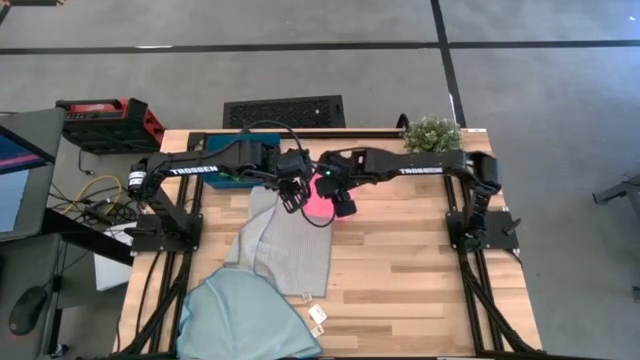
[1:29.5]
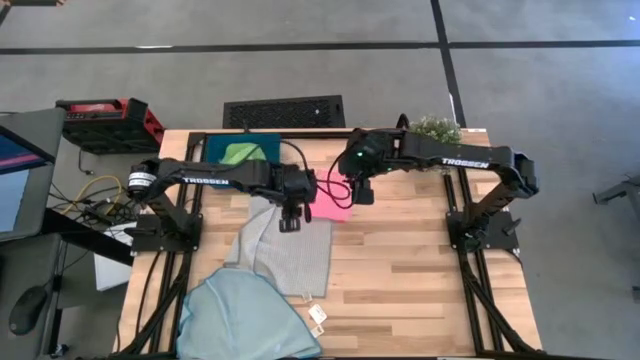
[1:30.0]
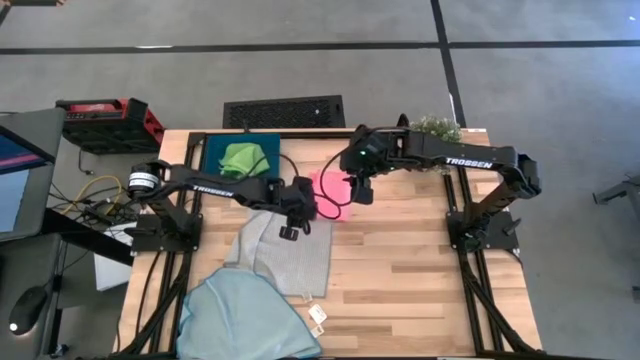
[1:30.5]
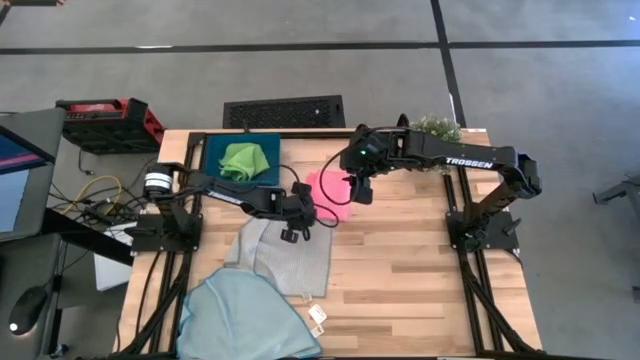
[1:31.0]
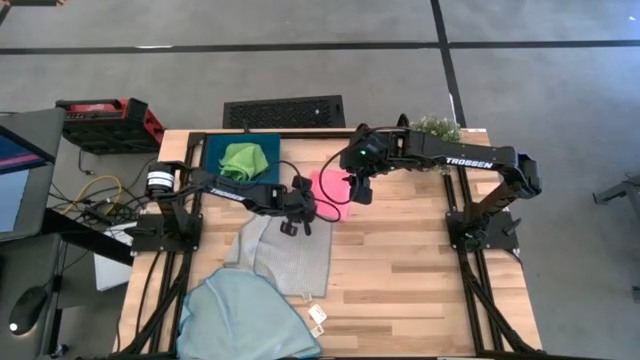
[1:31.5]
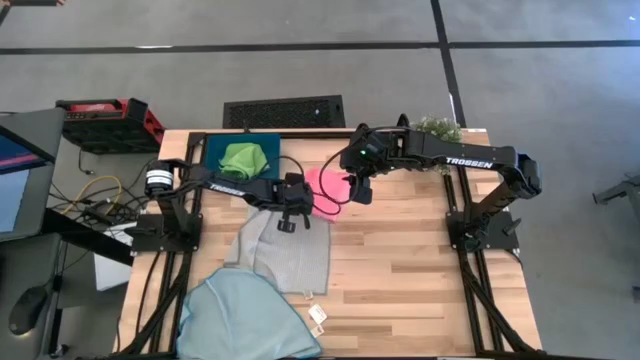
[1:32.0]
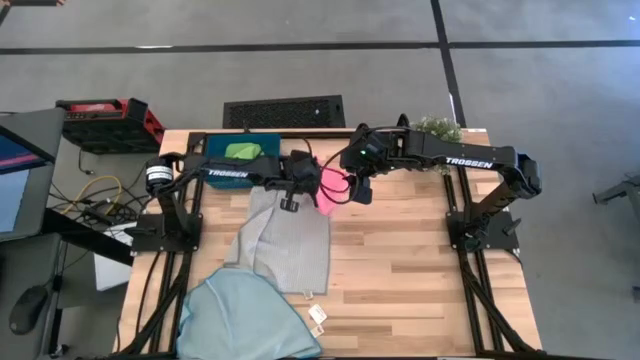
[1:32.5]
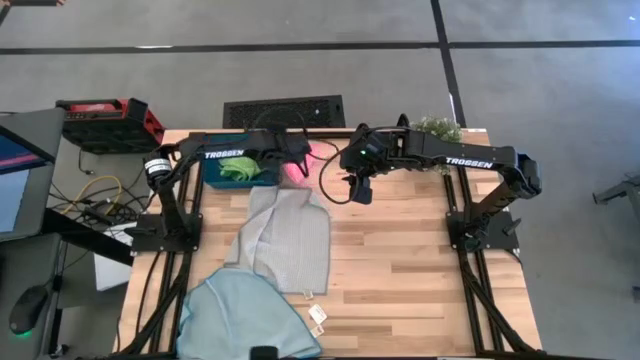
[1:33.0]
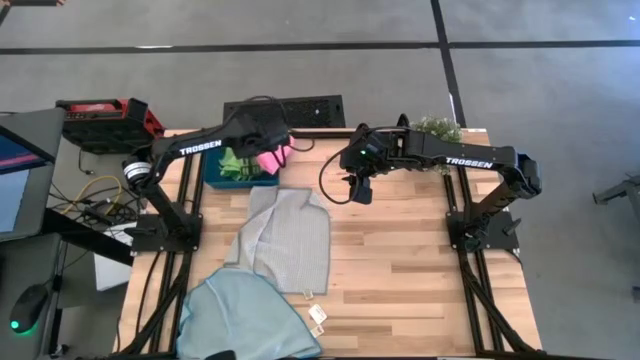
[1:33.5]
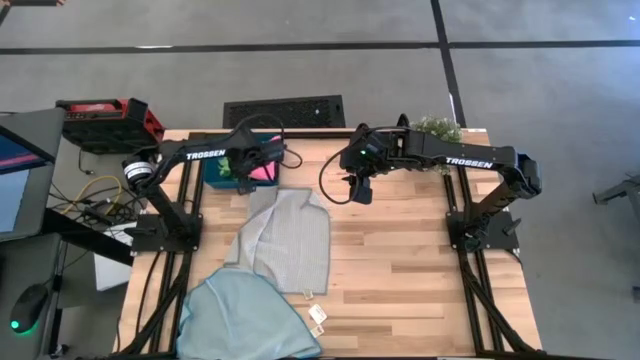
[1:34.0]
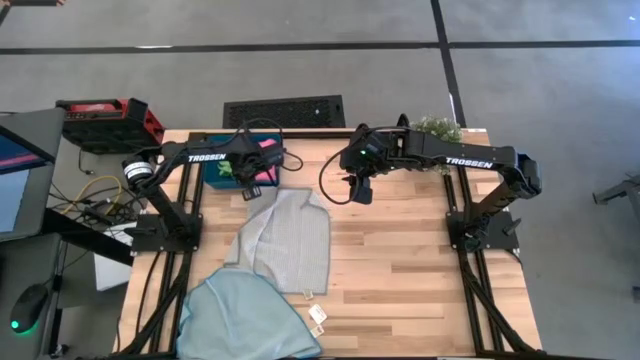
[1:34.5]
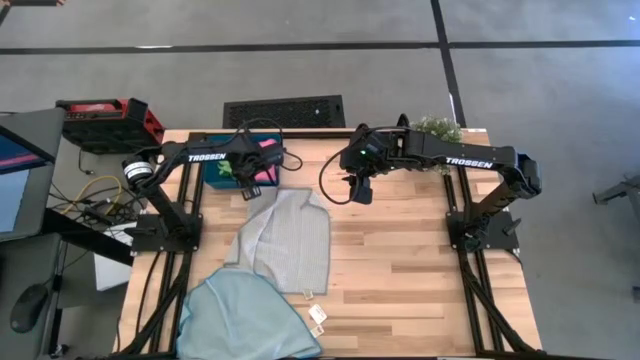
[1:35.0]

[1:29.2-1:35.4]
Task: Fold microfiber towels
Put the pink cloth into the blue bin

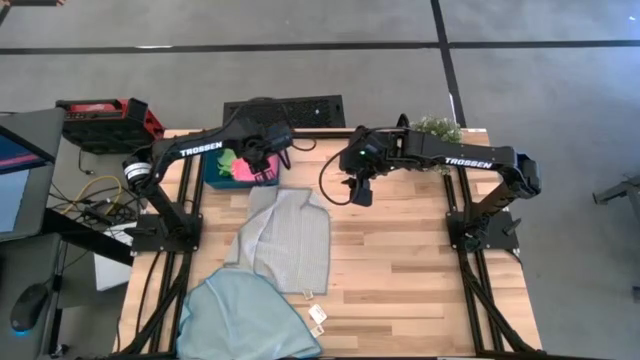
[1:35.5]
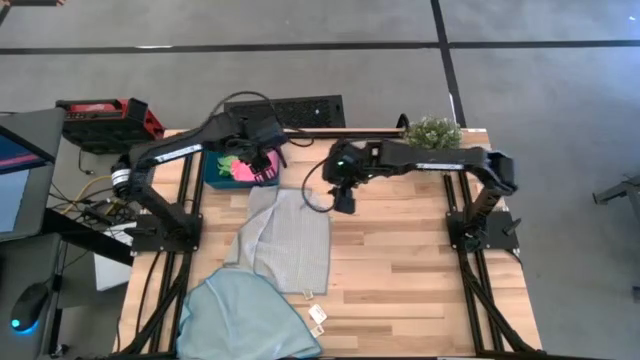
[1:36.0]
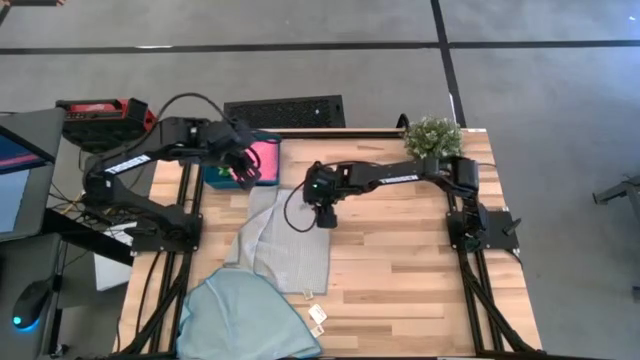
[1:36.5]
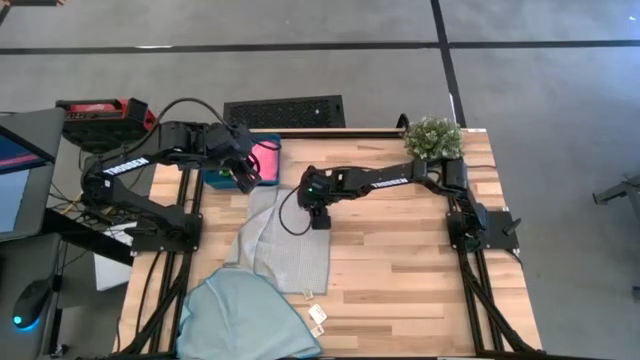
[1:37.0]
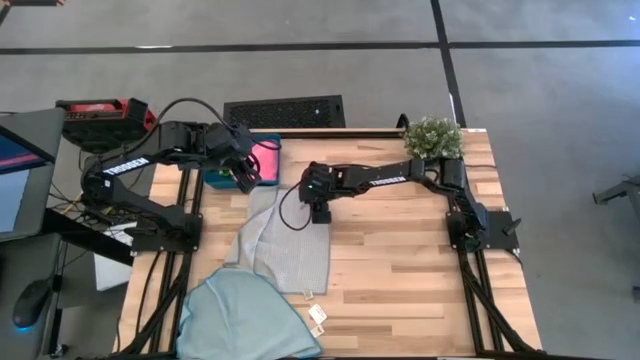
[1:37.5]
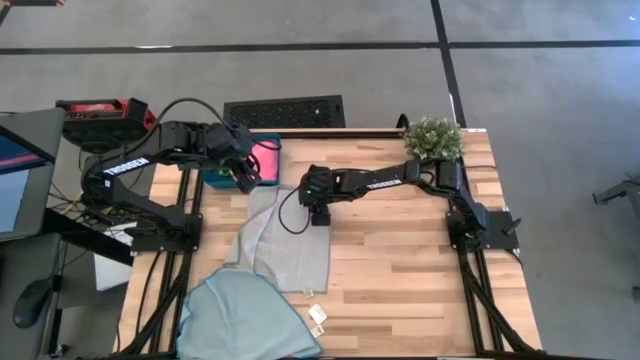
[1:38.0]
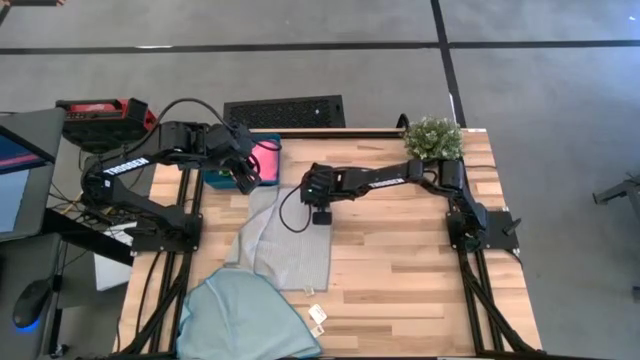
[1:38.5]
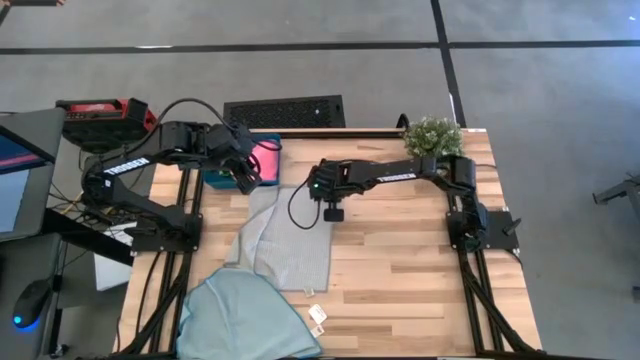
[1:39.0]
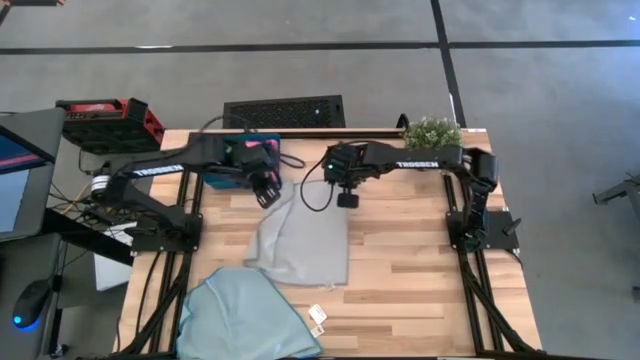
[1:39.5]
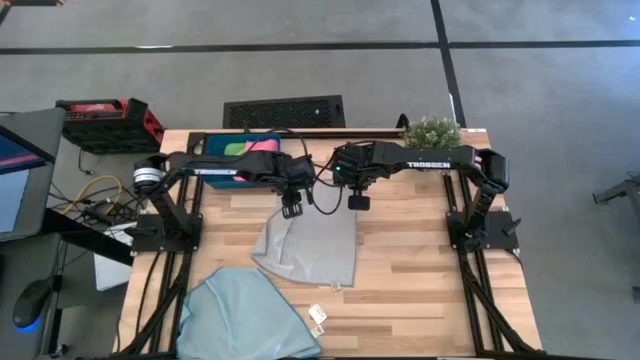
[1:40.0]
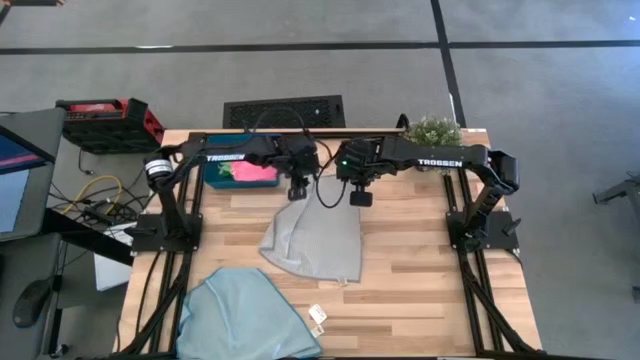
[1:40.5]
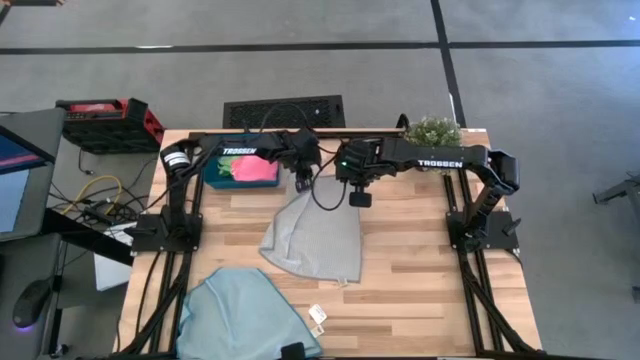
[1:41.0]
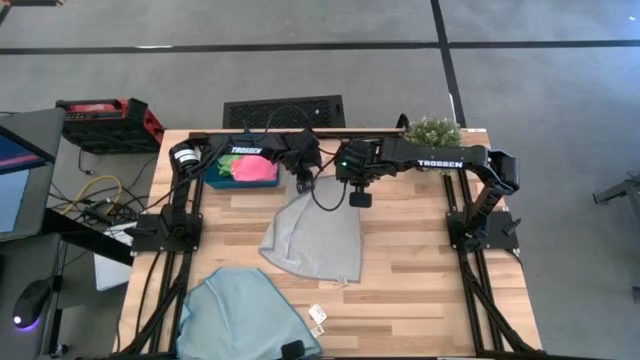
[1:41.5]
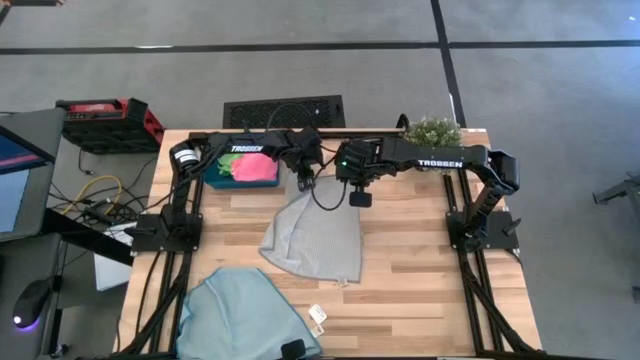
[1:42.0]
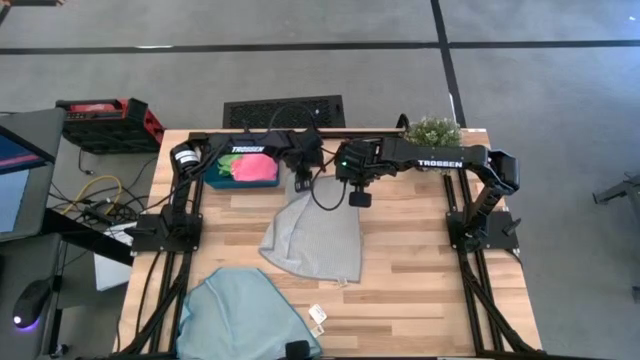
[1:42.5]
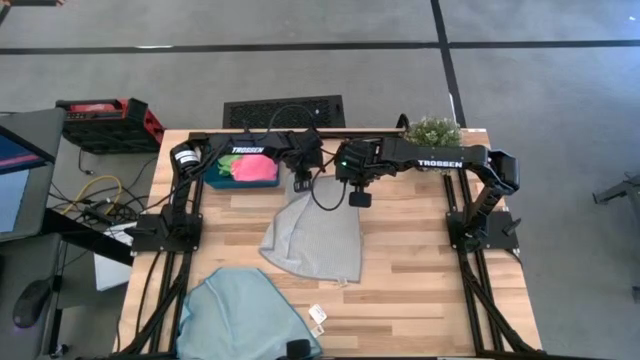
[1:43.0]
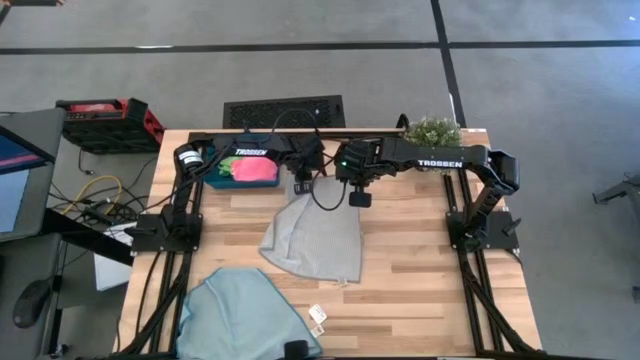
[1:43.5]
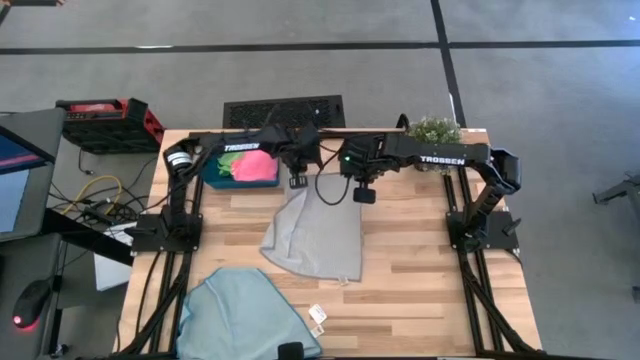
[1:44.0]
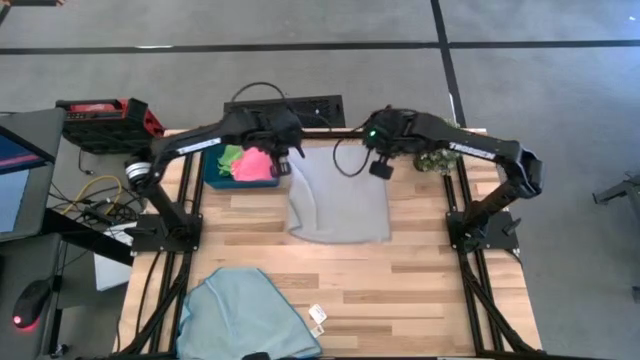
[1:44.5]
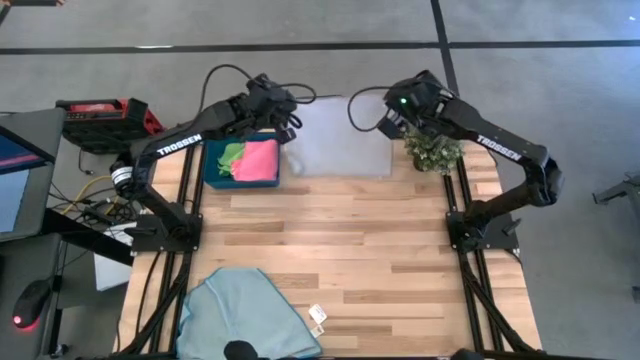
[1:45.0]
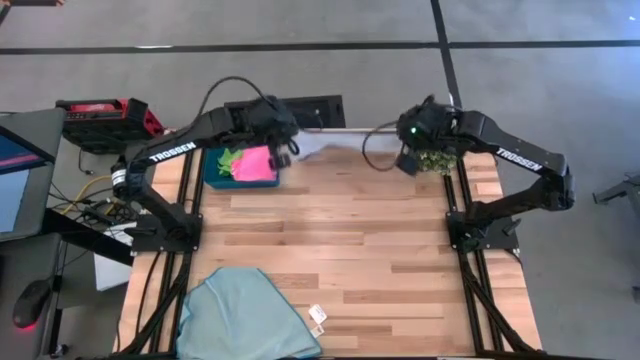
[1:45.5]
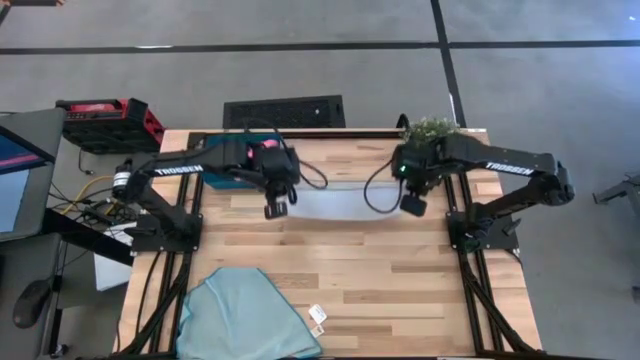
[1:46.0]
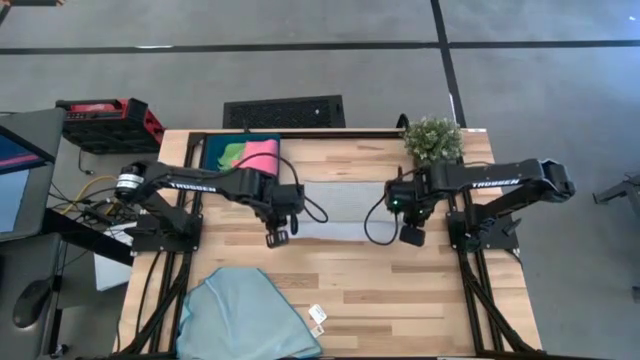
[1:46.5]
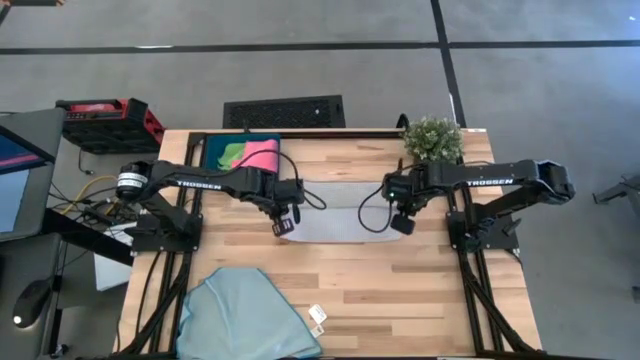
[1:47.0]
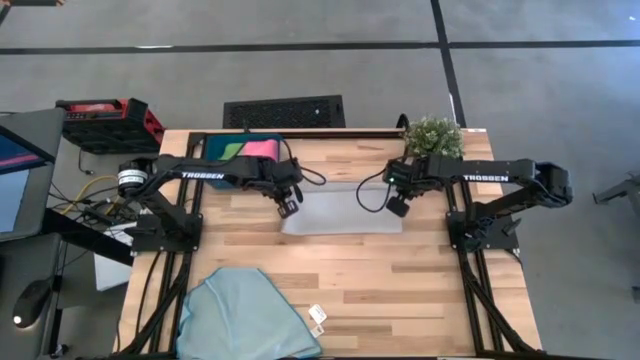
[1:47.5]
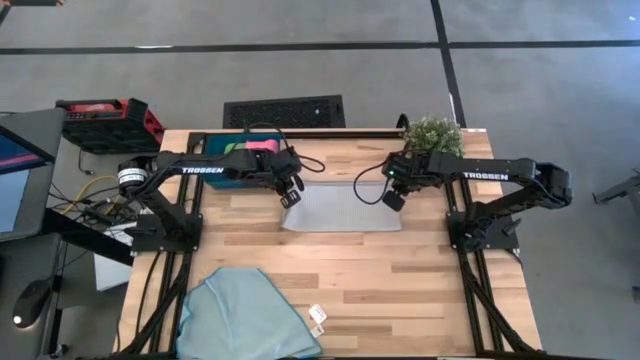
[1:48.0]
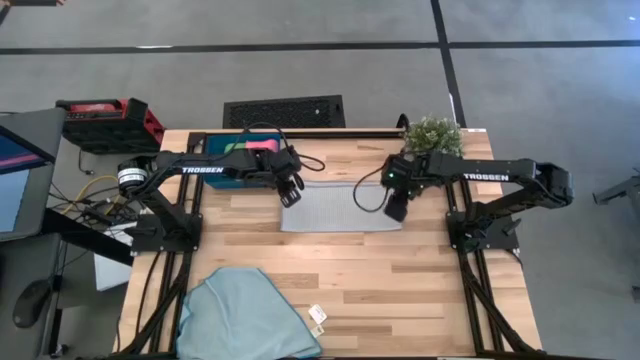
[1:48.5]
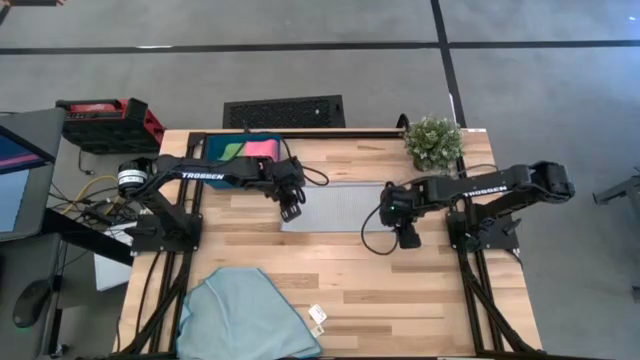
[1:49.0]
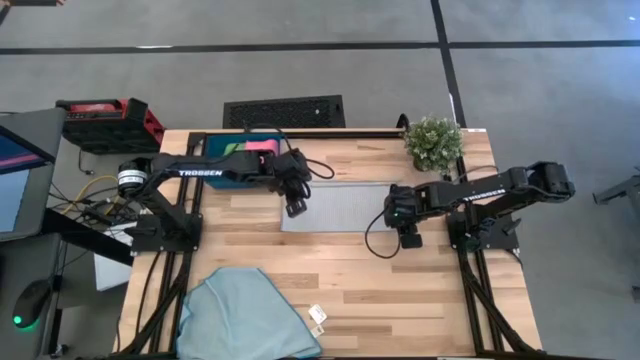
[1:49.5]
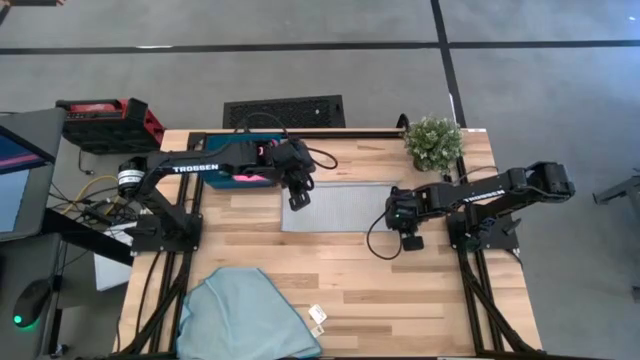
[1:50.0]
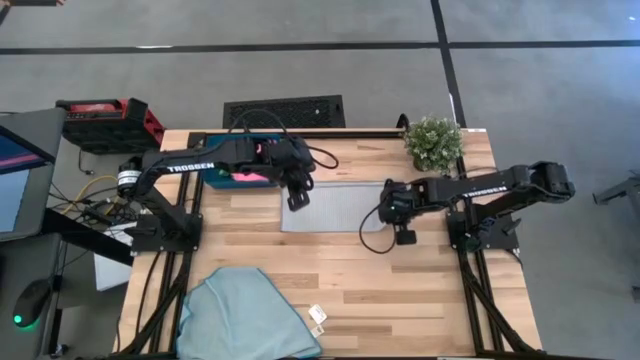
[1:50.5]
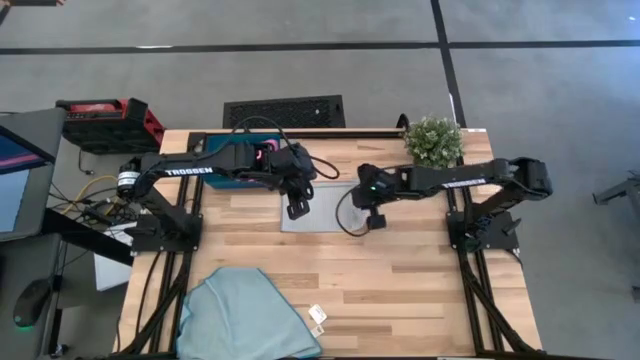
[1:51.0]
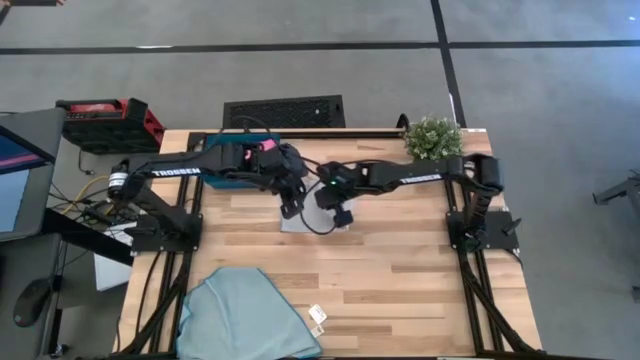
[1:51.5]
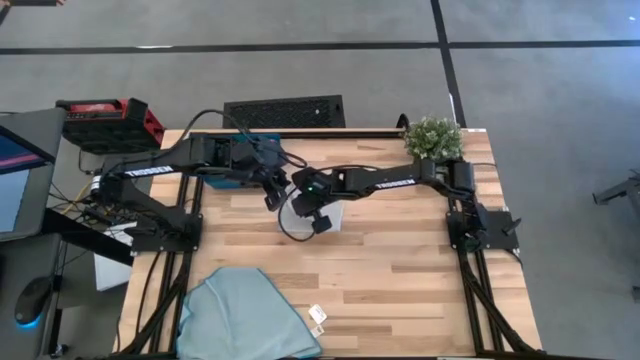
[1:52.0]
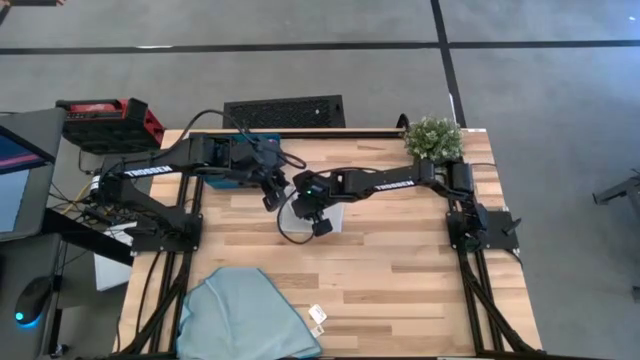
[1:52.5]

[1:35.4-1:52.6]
Fold the gray cloth
